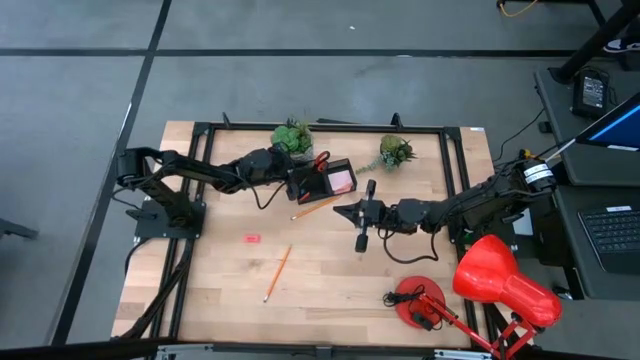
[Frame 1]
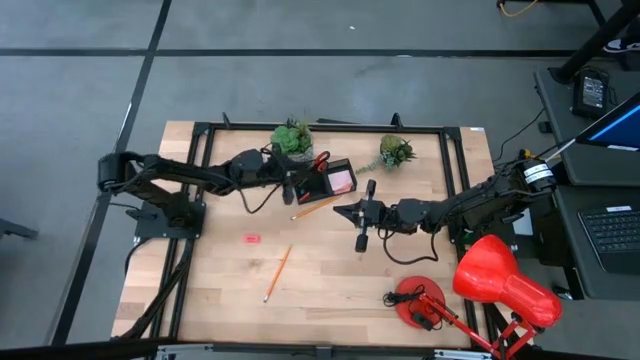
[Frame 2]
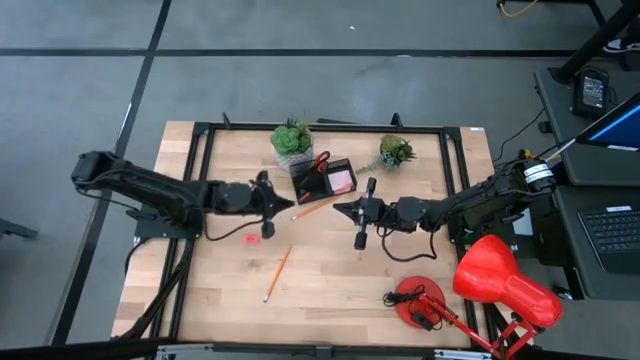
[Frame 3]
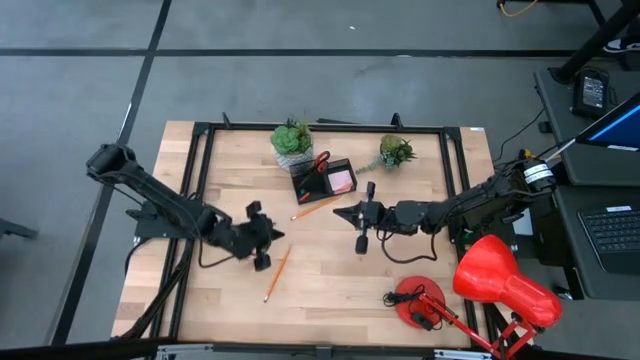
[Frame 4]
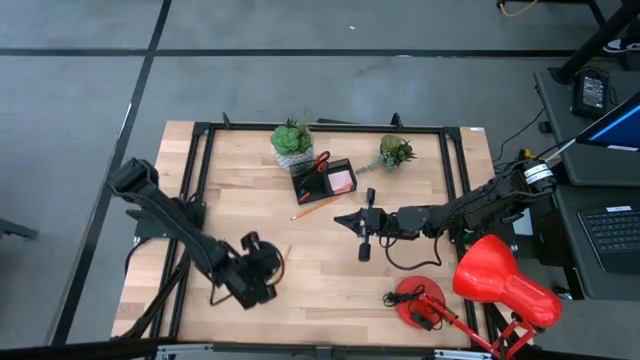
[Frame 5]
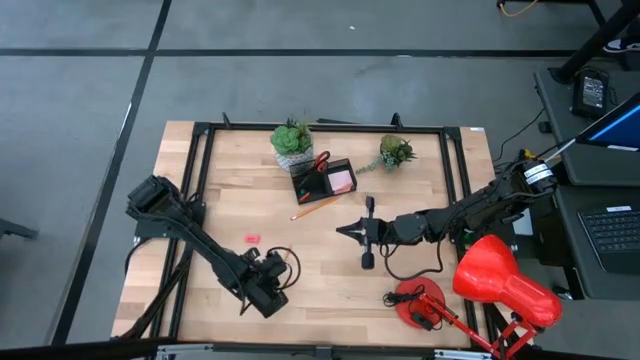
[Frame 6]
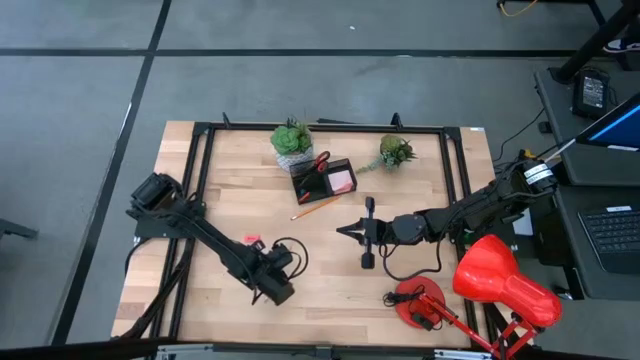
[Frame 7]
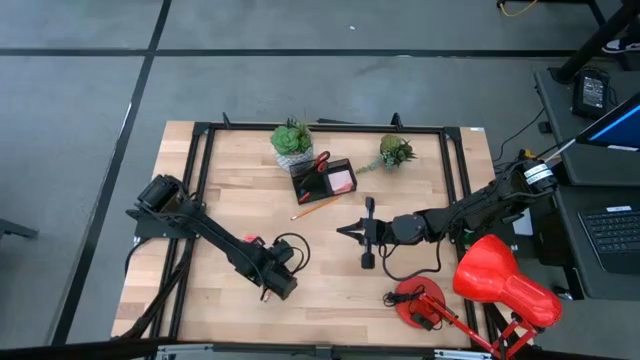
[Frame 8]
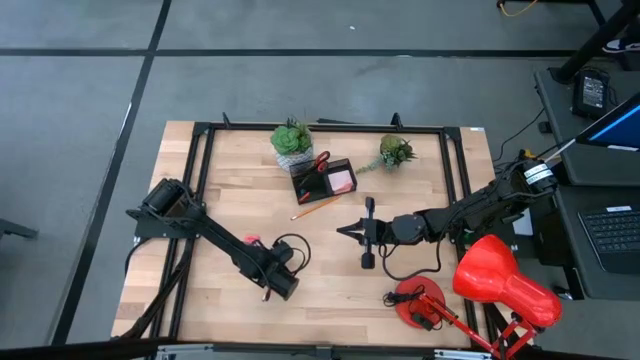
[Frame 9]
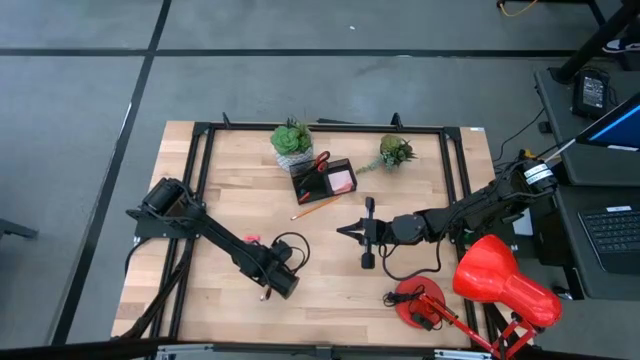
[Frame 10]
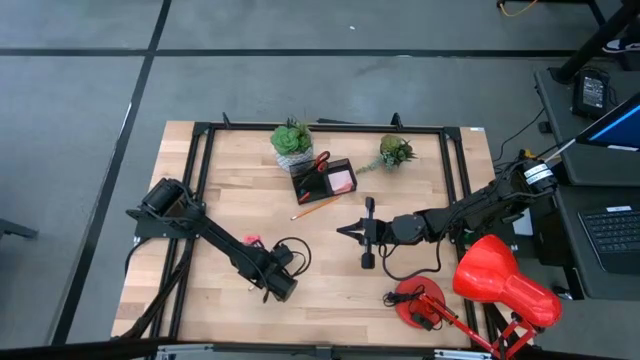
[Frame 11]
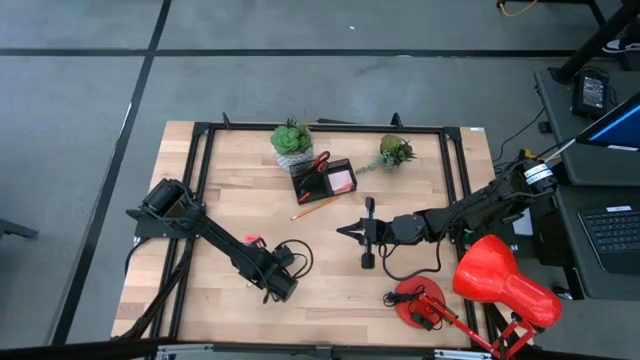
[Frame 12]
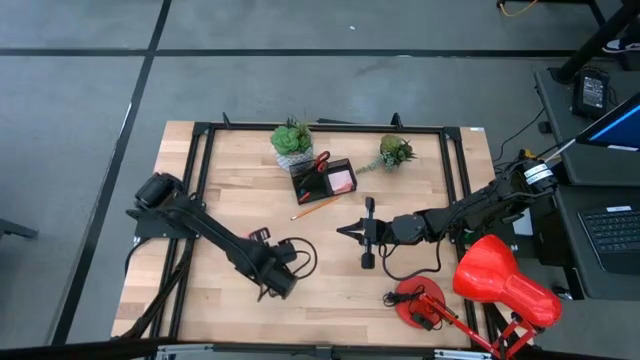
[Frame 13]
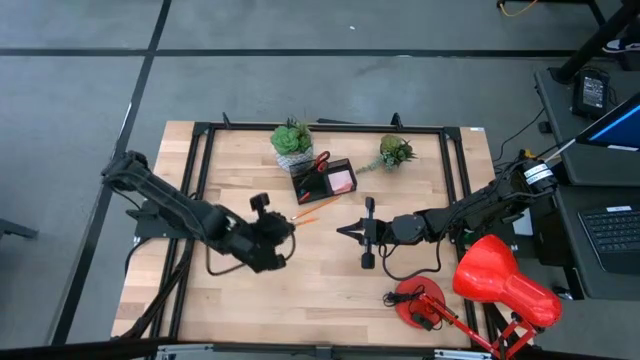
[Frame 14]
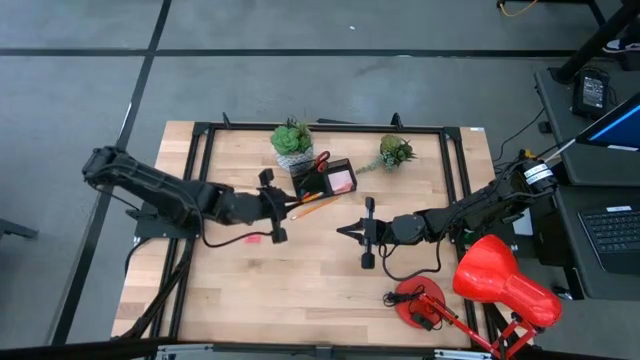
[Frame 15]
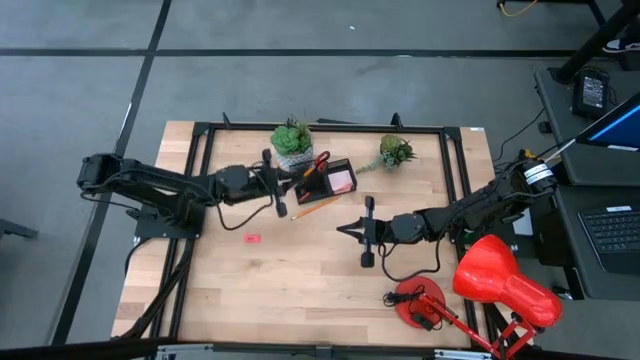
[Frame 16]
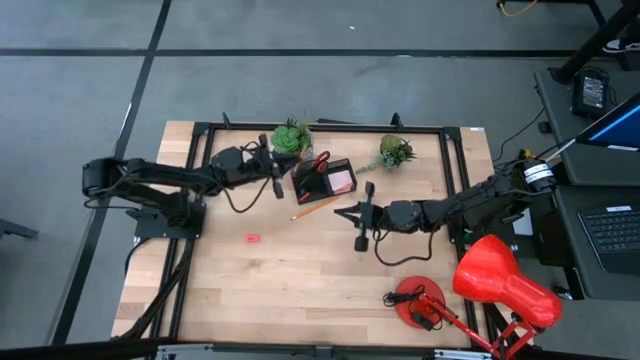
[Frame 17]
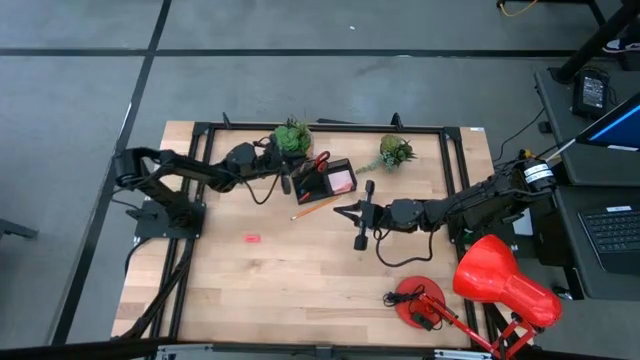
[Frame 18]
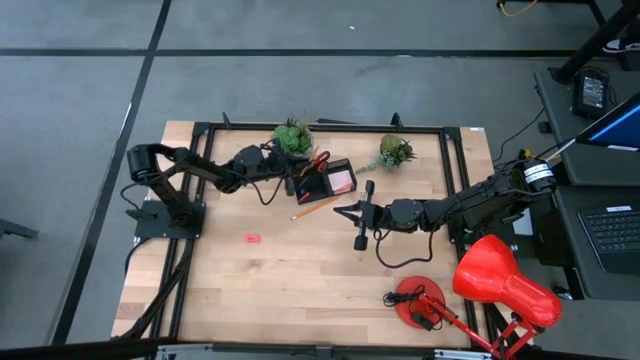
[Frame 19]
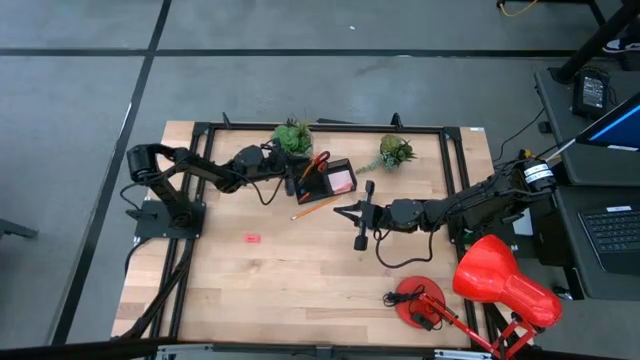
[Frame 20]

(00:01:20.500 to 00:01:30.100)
Task: Pick and place office supplies into organizer
Put the bottom orange pencil into the black desk organizer

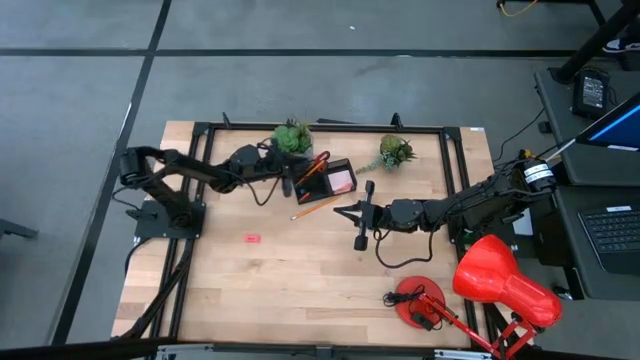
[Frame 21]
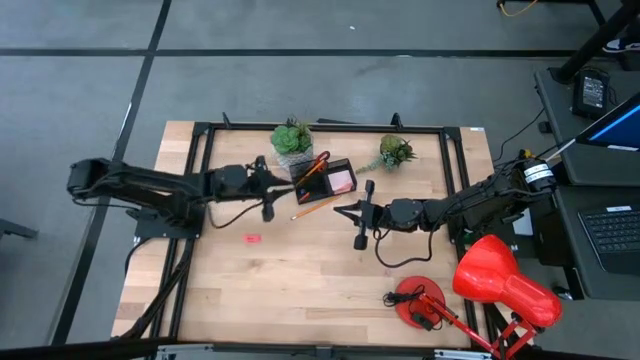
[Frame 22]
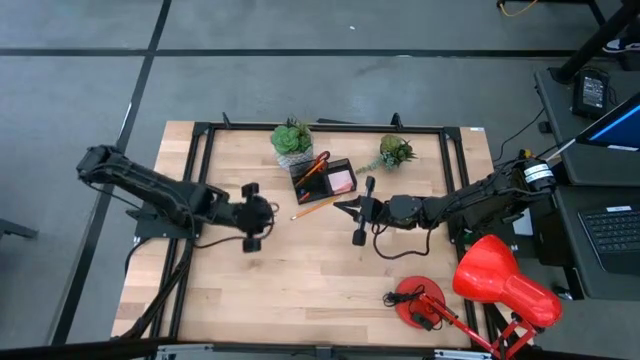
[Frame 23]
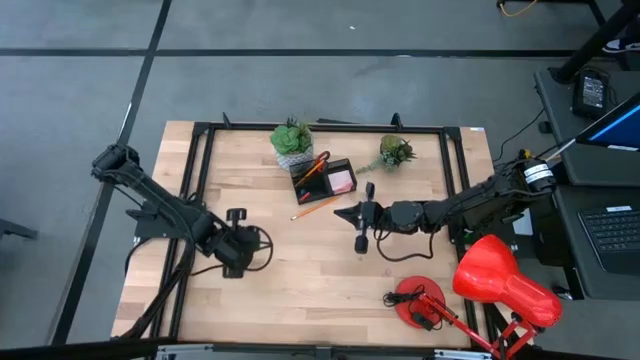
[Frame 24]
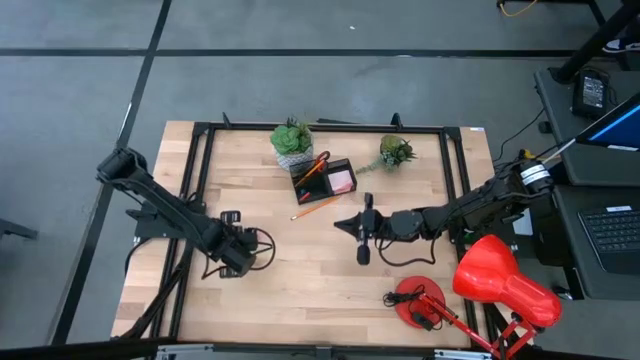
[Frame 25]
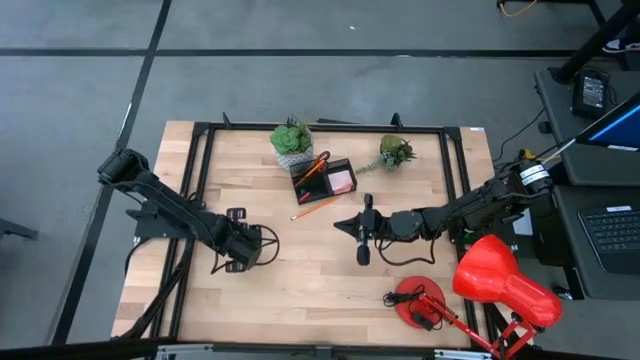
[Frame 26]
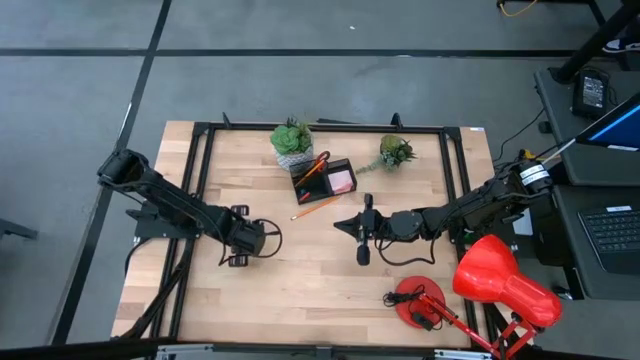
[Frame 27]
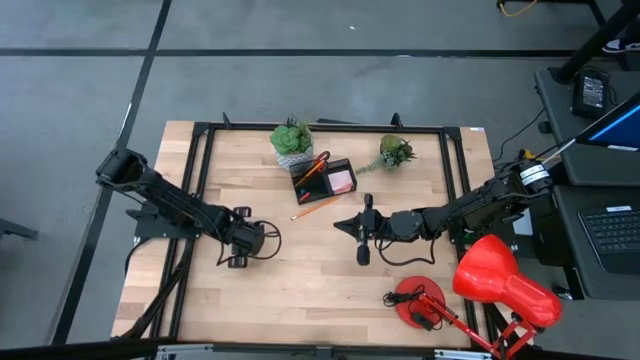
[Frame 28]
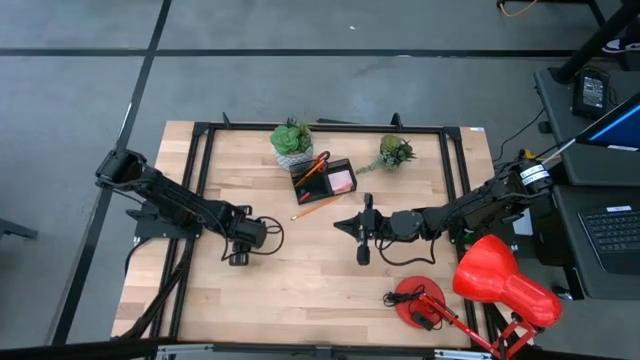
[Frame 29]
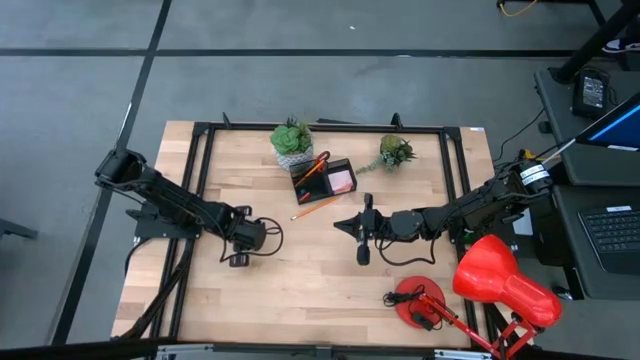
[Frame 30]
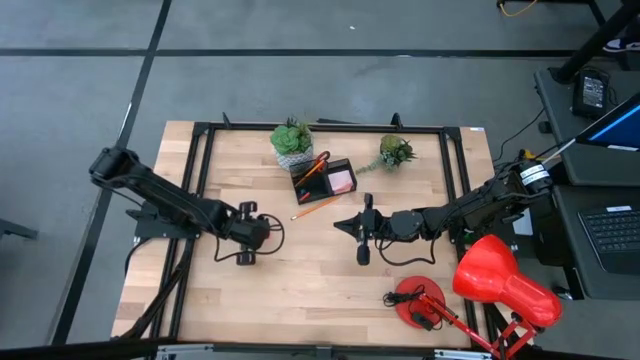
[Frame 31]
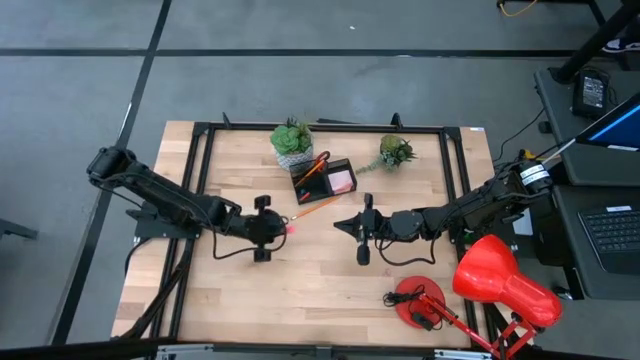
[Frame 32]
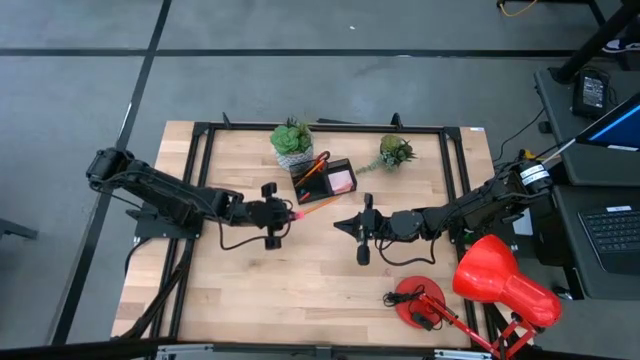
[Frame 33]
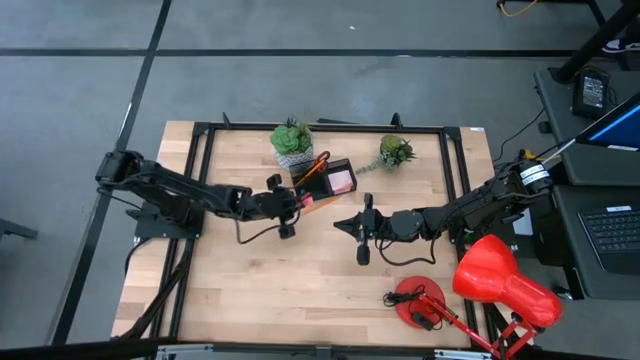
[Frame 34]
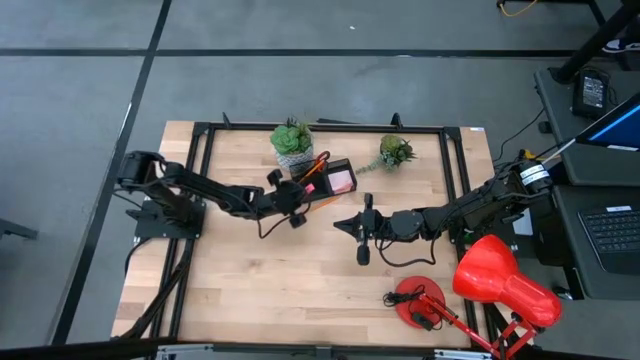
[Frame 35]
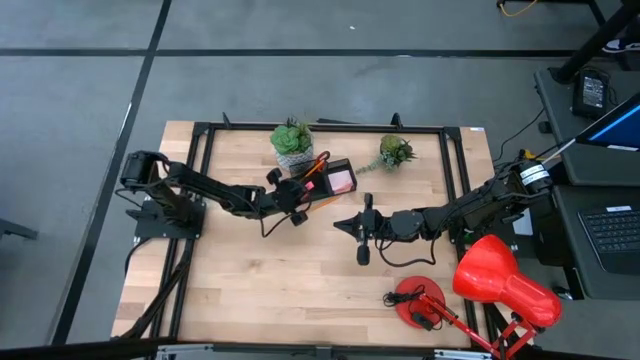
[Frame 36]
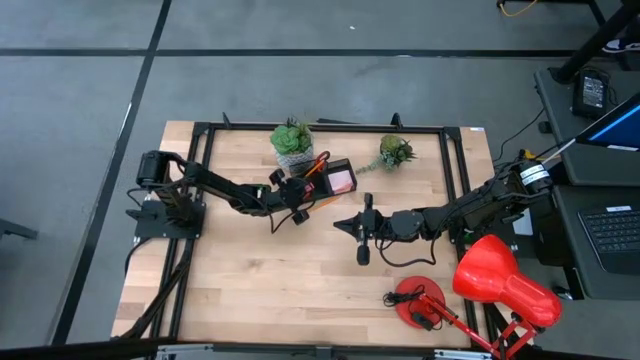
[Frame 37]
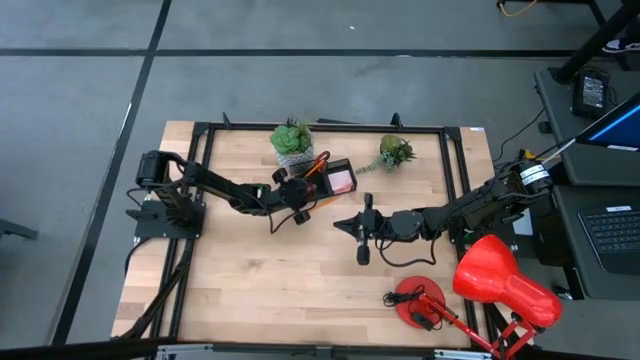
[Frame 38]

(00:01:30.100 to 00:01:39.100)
Put the pink eraser into the black desk organizer

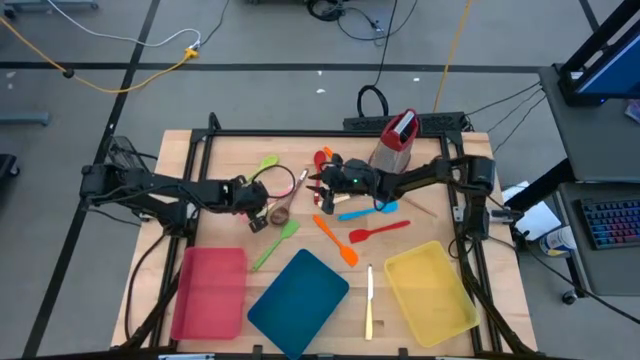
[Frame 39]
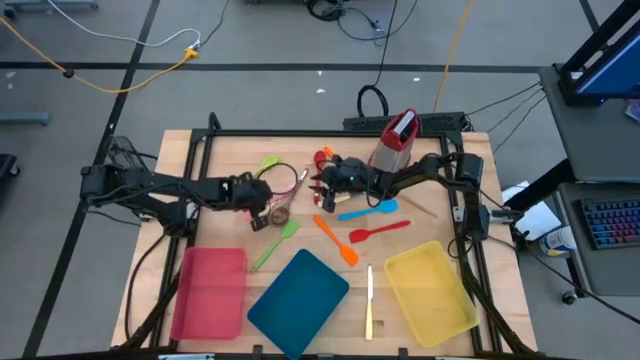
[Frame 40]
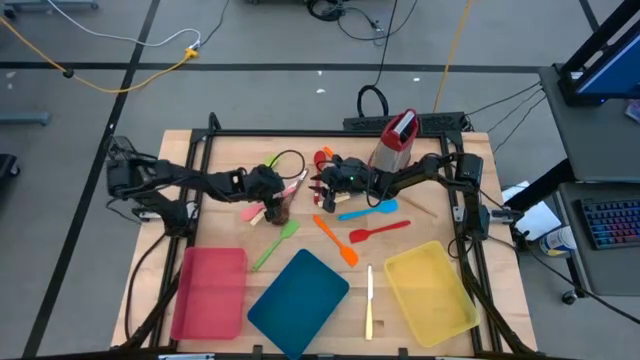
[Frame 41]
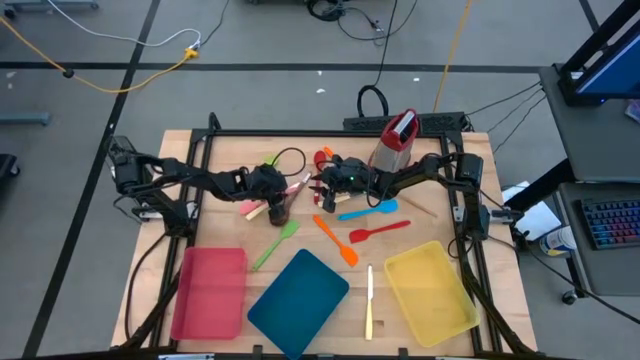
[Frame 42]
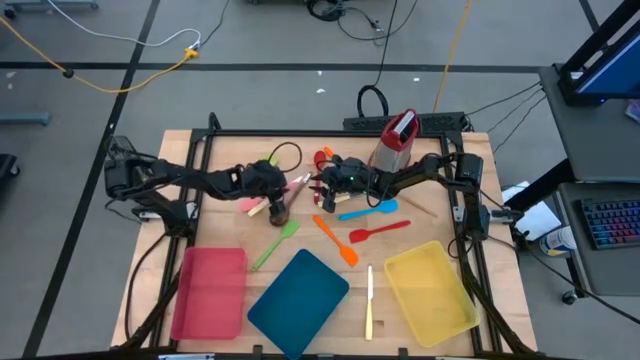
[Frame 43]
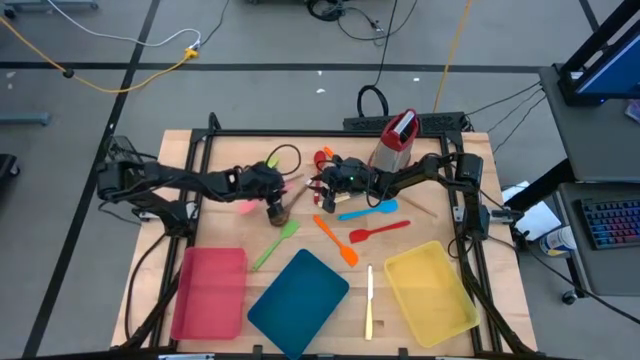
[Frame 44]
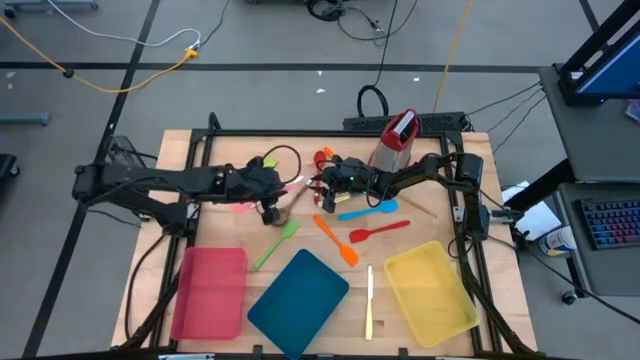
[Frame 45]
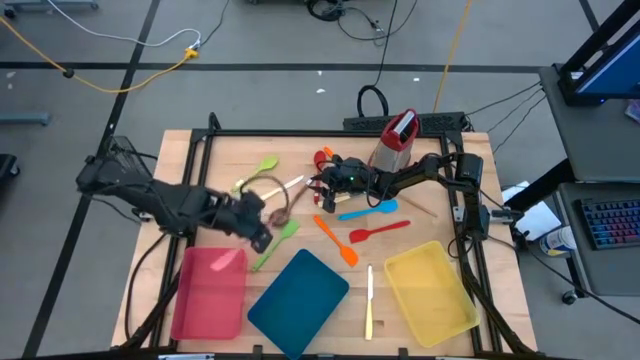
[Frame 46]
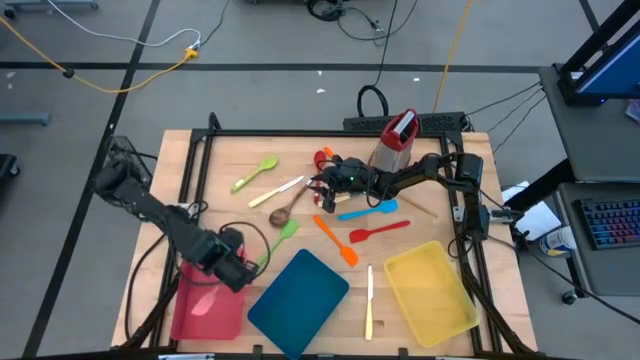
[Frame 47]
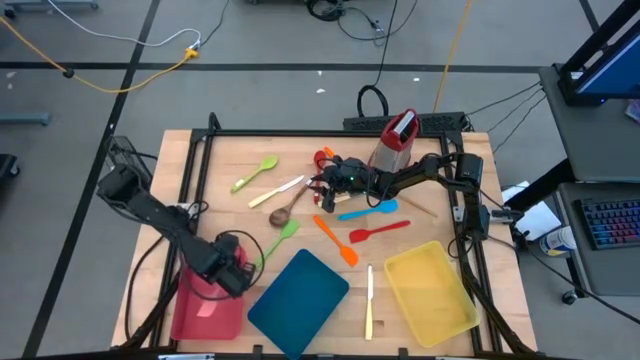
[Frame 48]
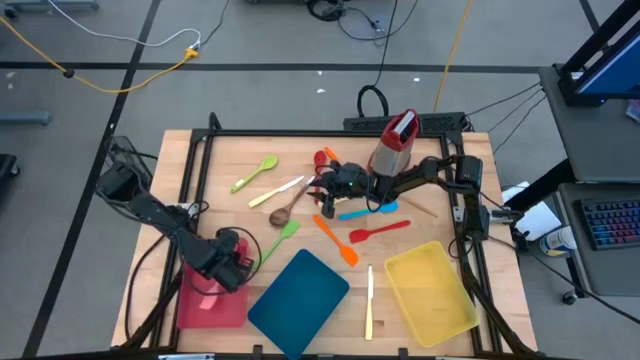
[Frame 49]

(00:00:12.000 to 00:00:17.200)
Task: Pick & Place Kitchen Items
Put the pink spatula into the pink bin
